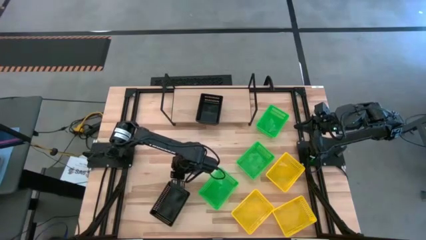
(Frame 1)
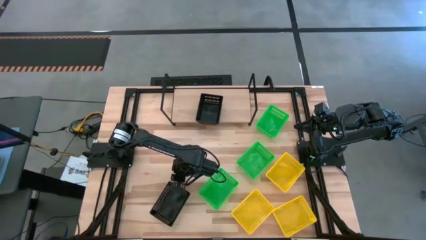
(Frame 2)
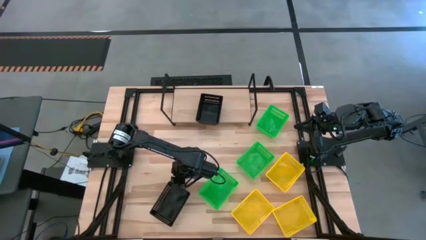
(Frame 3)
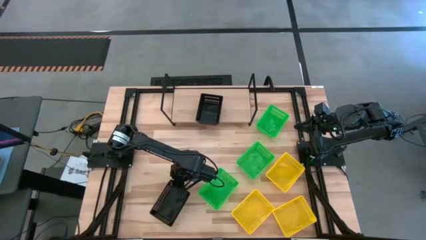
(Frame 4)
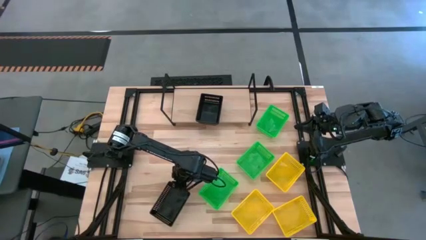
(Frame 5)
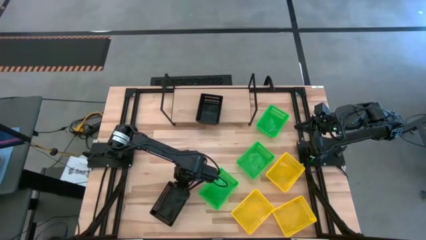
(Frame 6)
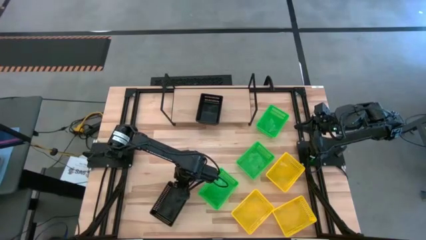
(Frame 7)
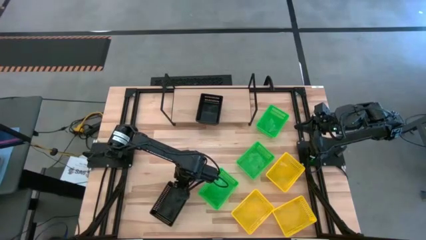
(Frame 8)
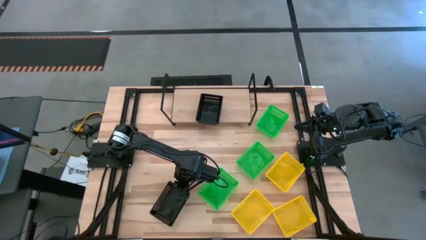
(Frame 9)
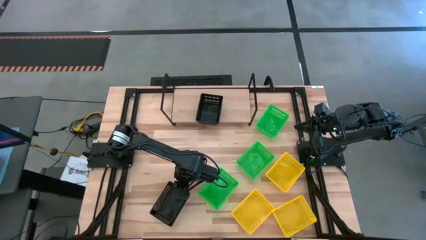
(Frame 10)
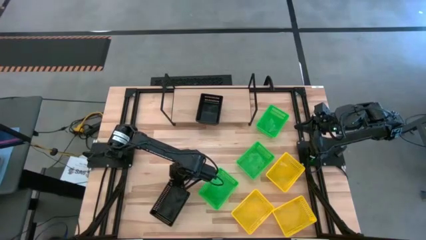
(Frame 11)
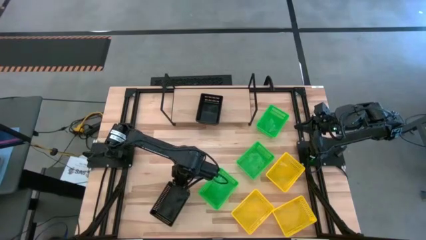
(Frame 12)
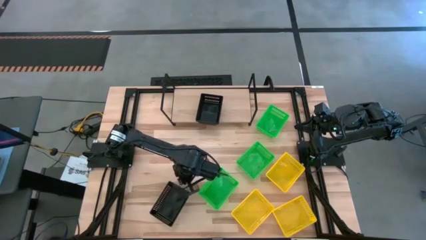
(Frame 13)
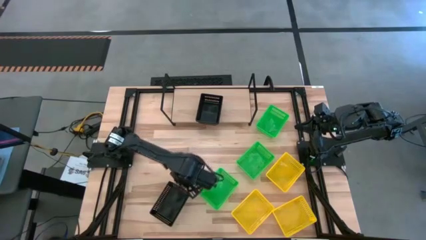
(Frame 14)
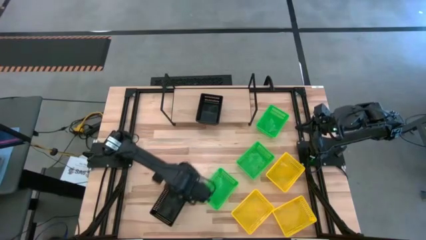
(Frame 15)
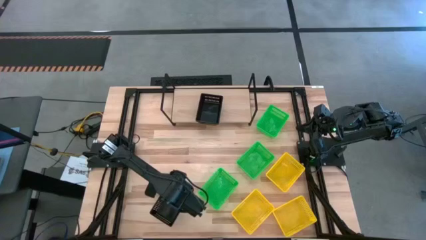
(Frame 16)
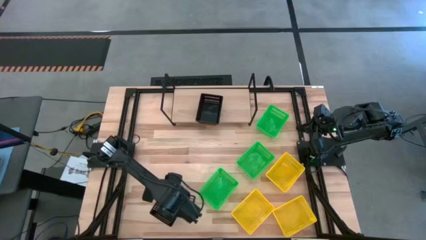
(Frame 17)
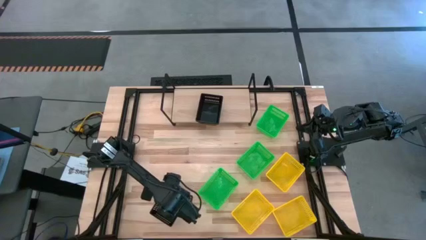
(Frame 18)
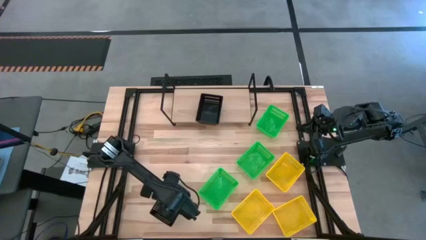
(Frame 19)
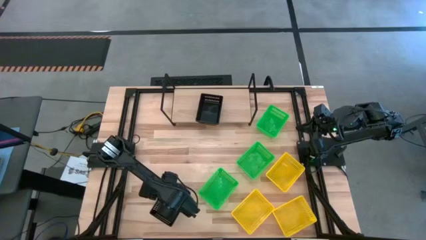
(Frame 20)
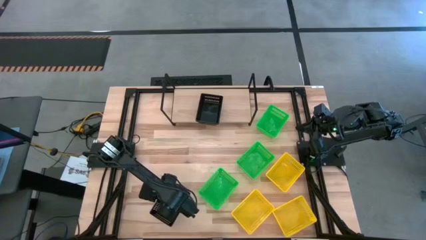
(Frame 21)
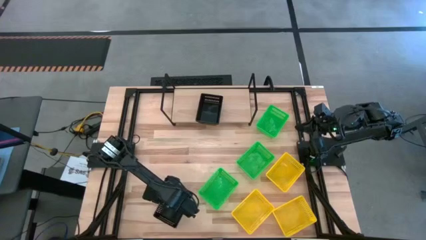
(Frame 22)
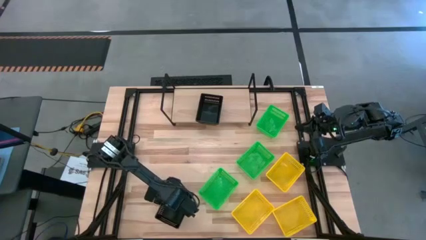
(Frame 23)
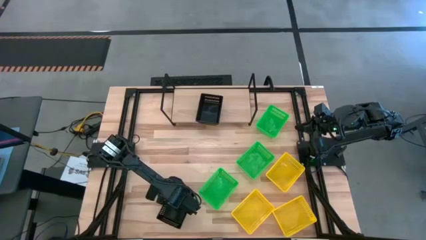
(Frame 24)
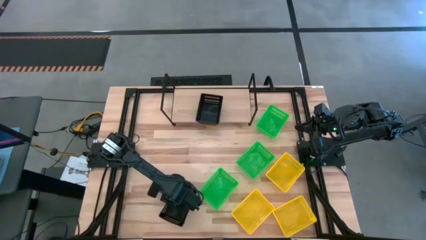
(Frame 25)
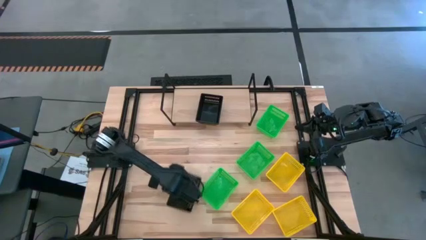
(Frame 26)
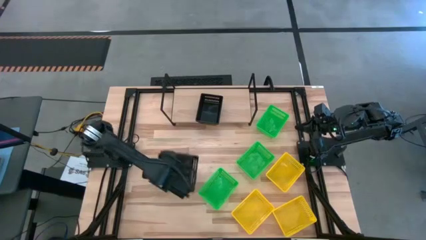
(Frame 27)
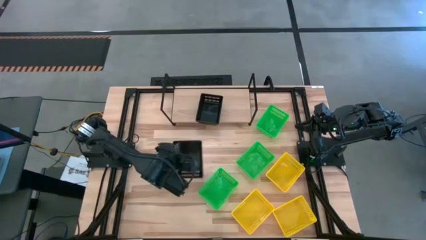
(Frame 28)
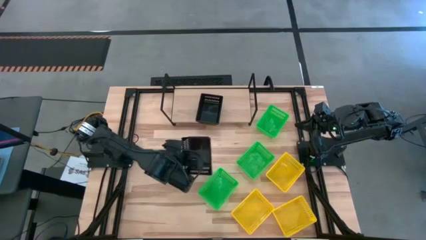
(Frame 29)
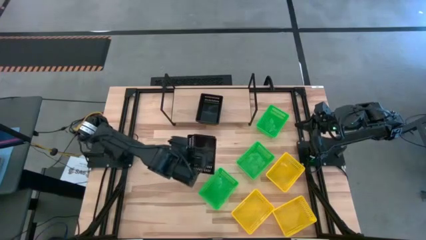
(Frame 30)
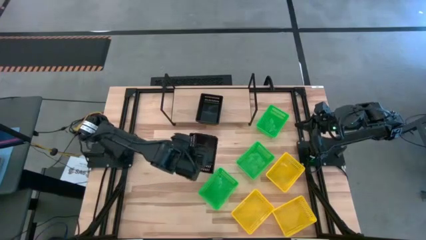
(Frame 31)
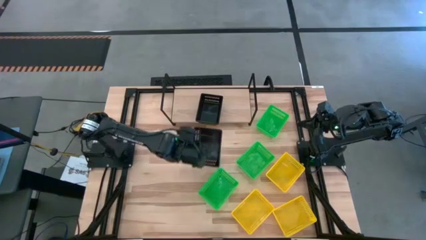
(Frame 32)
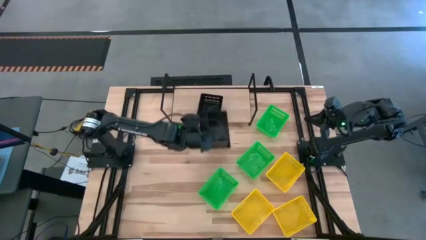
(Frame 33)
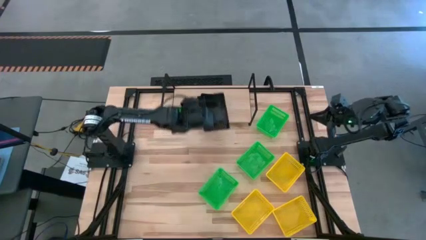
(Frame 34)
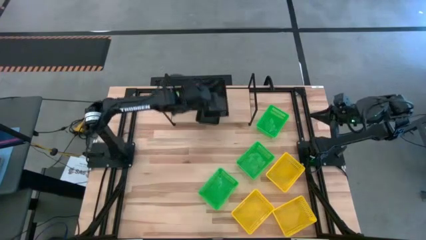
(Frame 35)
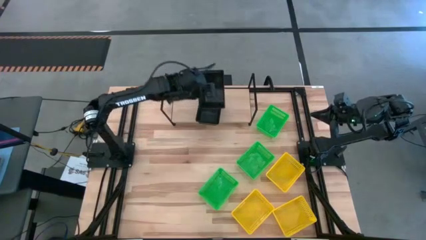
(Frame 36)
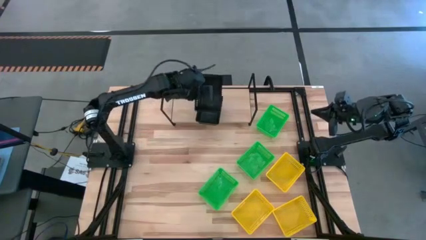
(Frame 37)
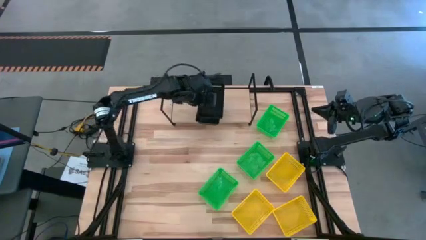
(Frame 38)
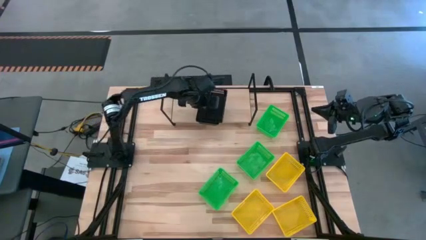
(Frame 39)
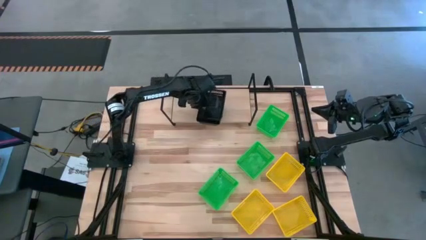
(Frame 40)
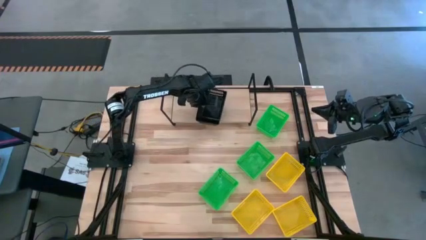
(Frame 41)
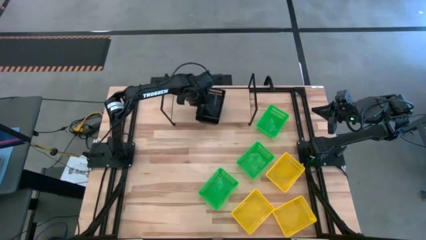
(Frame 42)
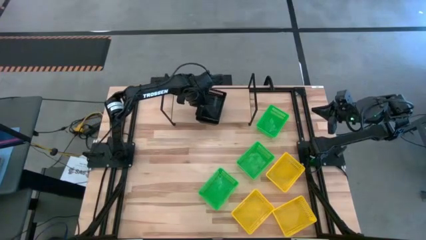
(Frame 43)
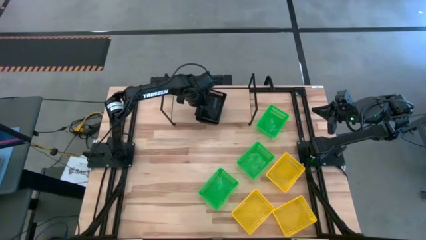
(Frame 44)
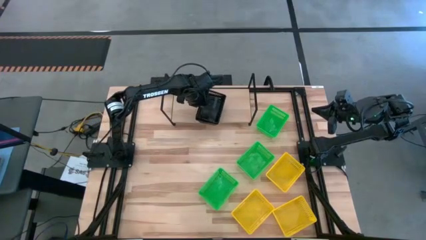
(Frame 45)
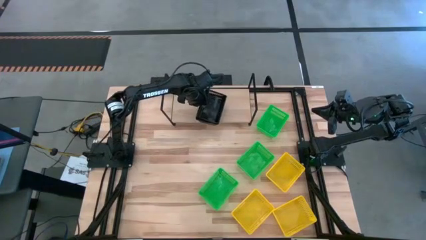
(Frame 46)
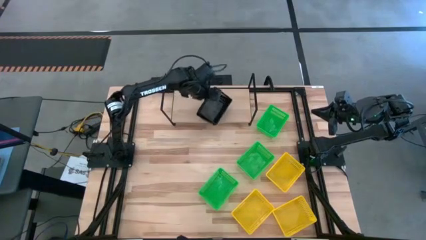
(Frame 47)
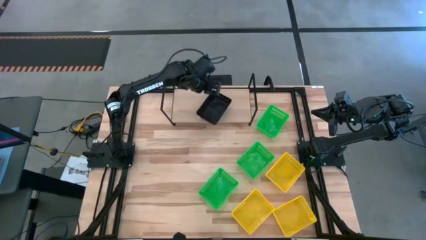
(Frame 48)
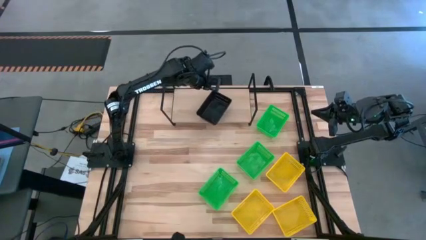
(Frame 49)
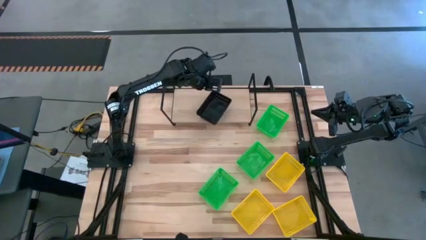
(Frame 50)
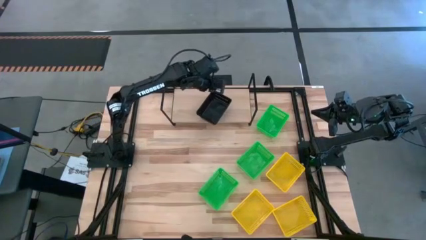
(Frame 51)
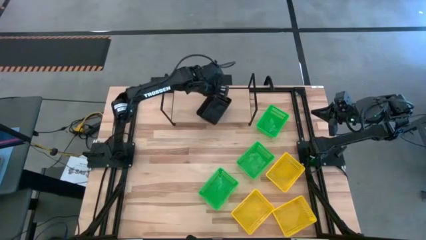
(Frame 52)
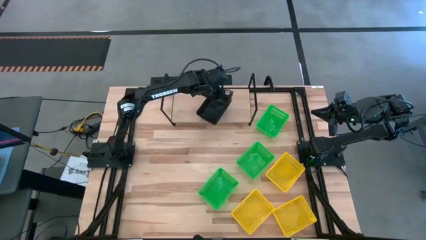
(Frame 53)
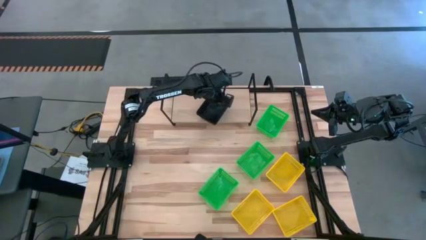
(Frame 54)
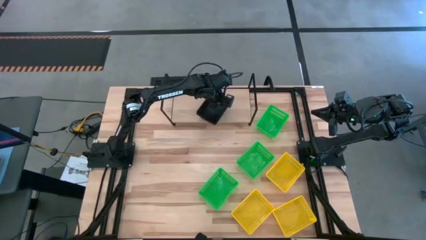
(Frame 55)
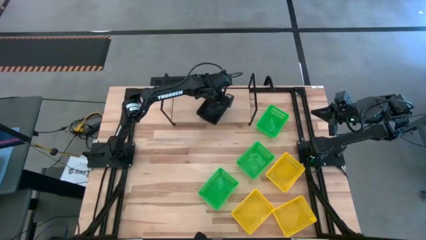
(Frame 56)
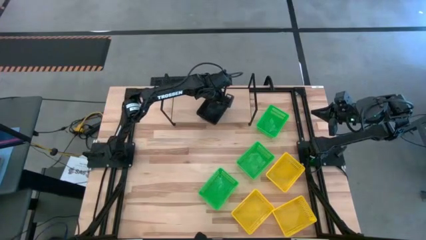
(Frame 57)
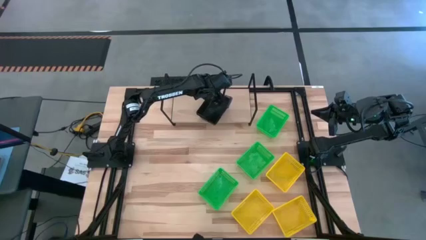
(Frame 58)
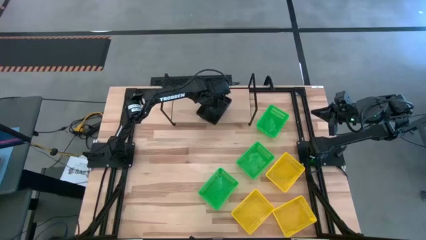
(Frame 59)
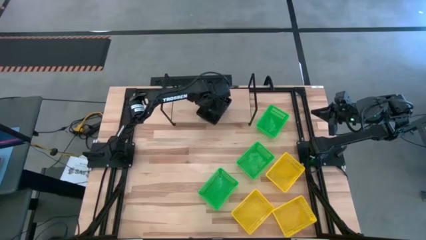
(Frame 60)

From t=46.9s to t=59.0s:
Task: Stack baskets on shelf by color
Stack the black bin on top of the black bin on the shelf
